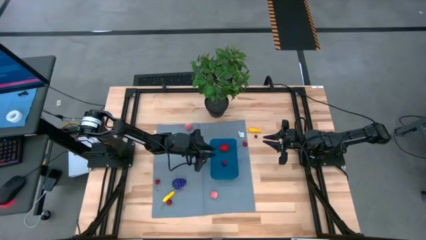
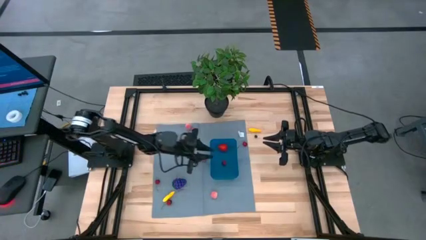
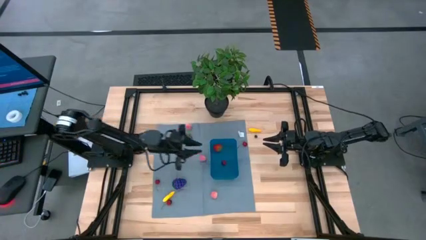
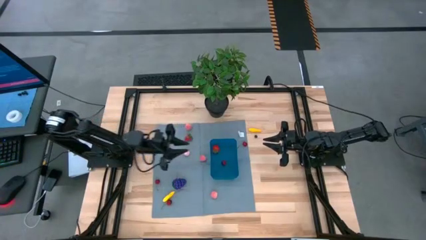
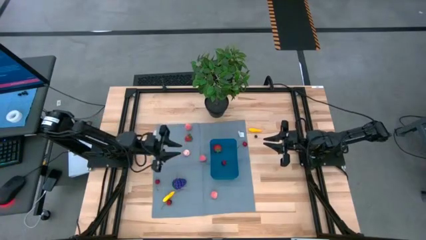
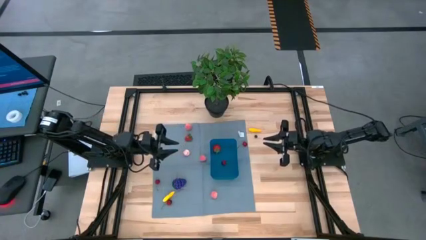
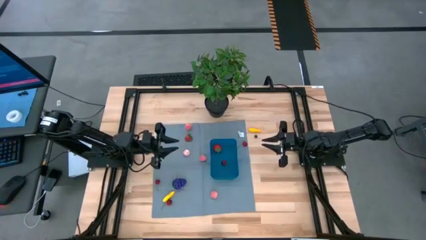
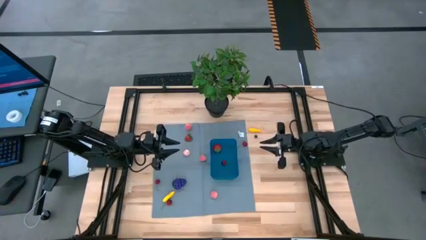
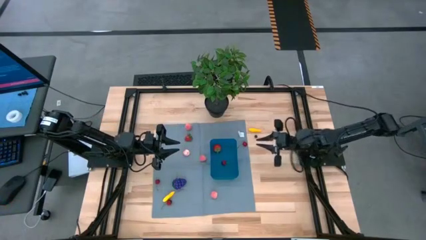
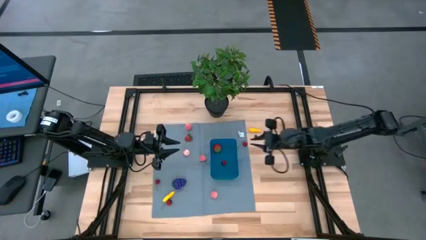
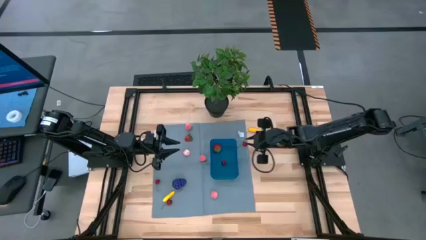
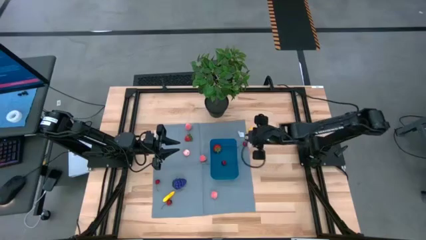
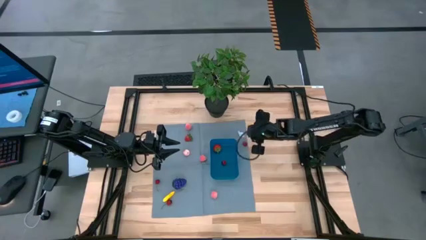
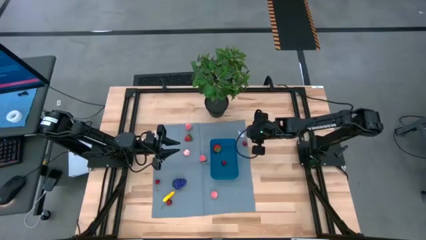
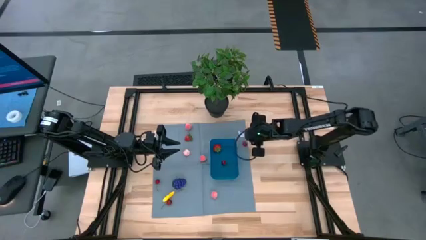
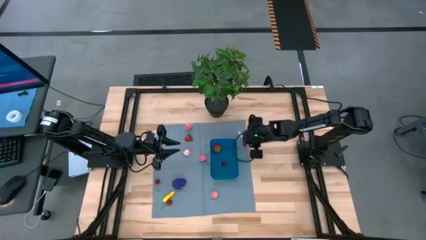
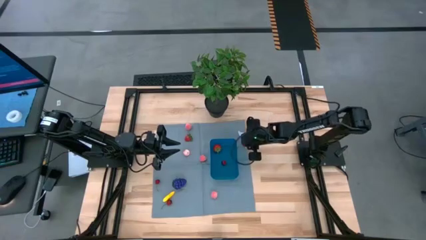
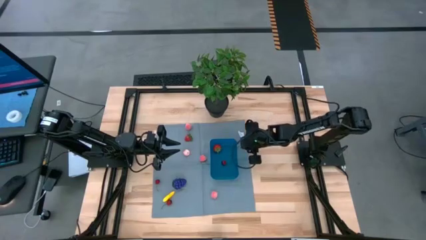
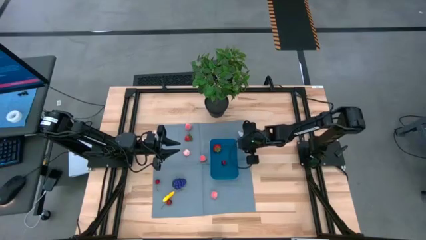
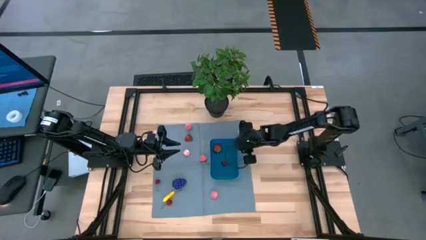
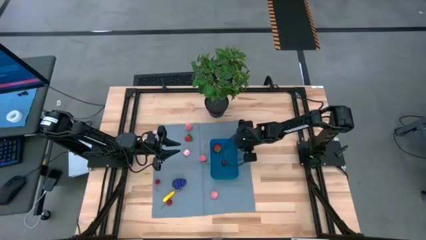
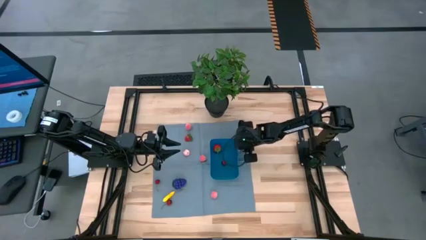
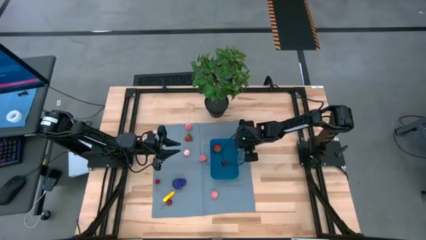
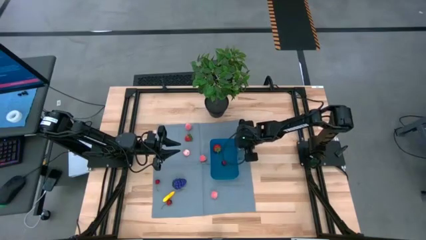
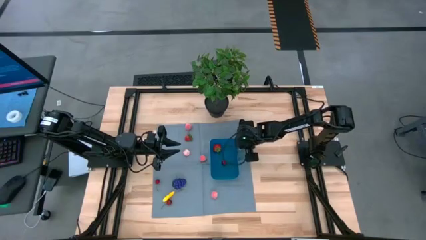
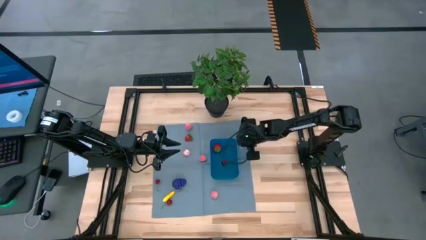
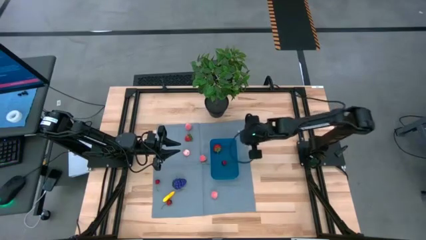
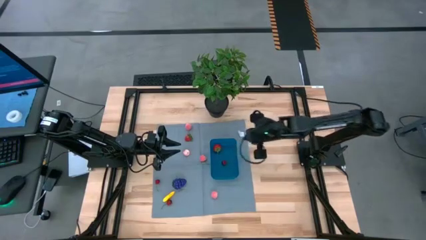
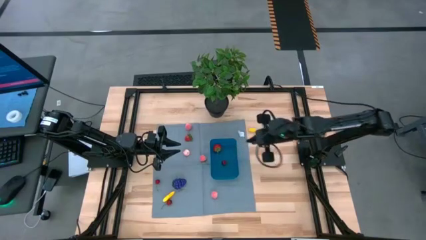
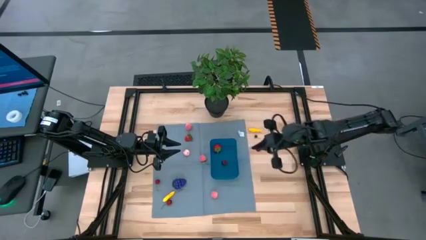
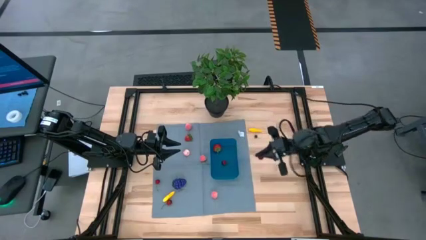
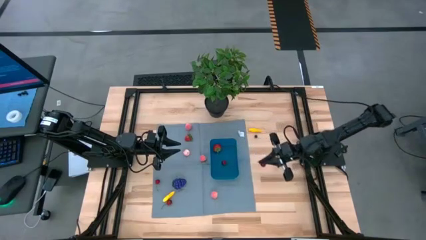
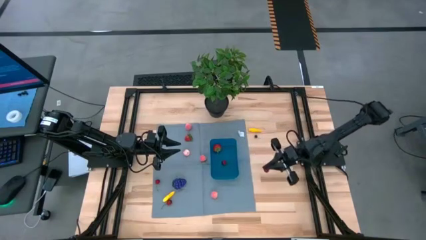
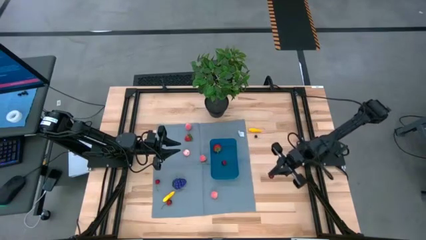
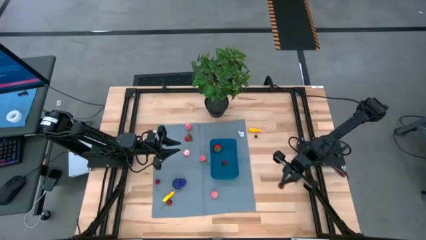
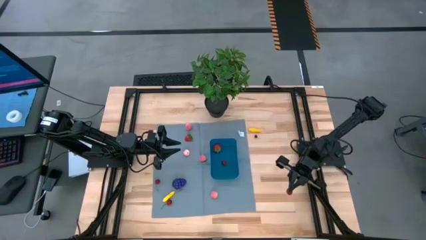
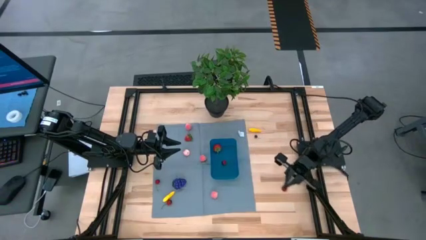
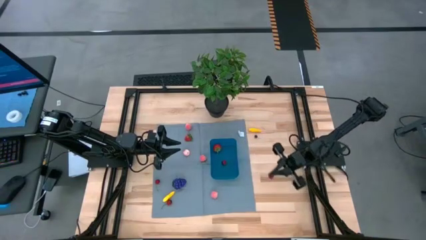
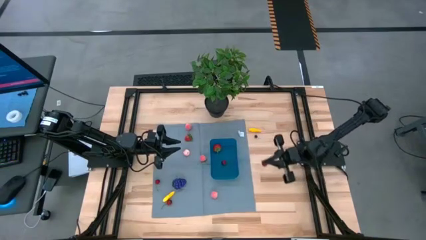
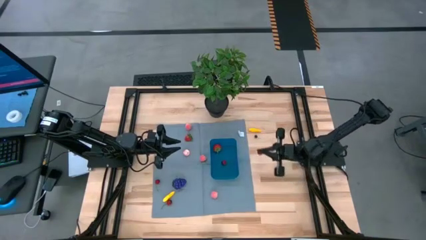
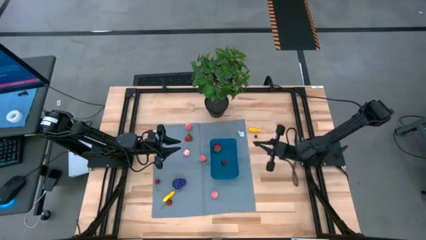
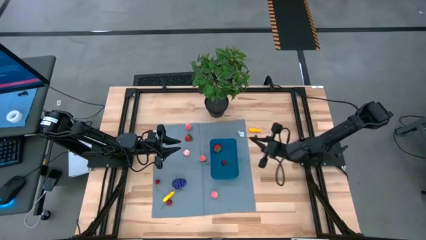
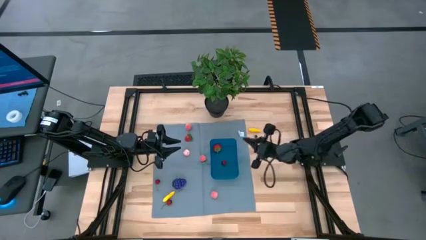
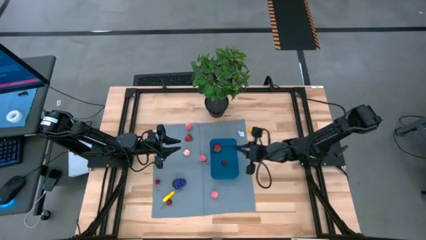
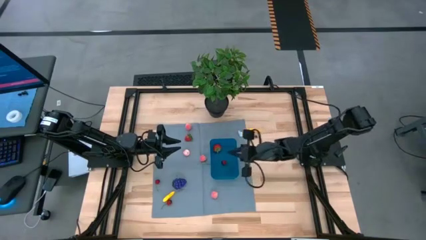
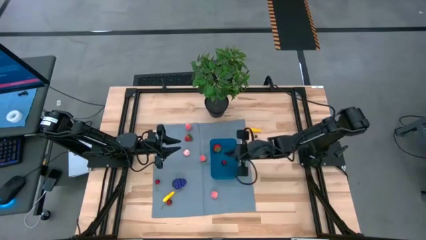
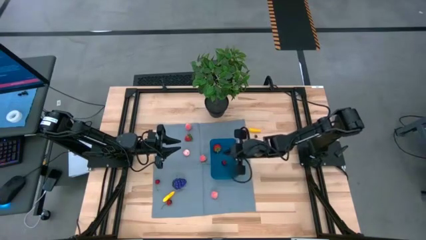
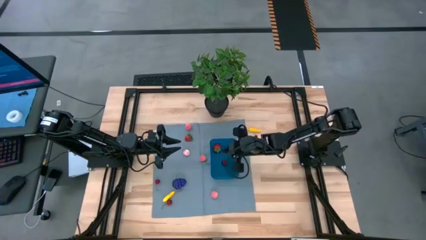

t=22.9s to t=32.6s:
Task: Pick and placing Produce into tupperware
Put the red cherry into the bin
